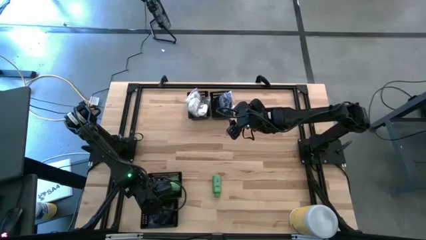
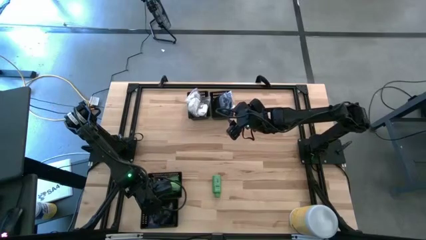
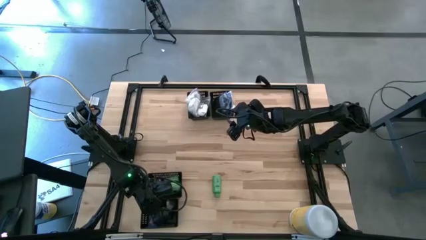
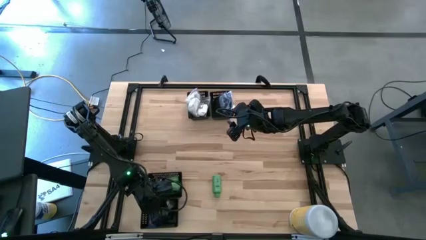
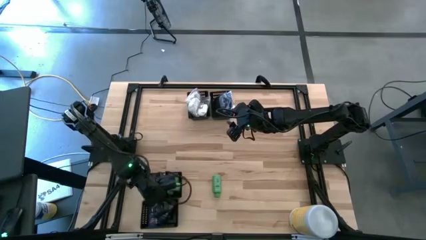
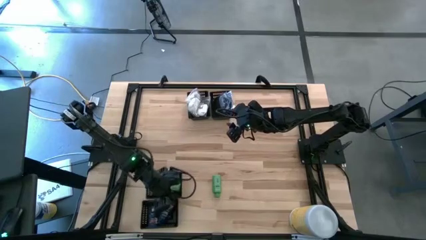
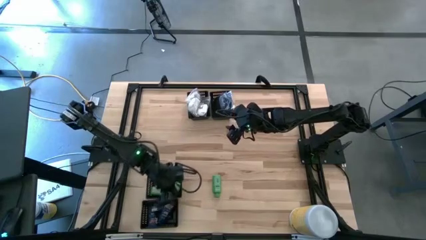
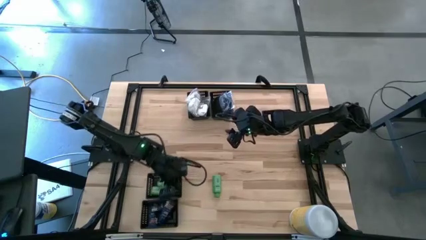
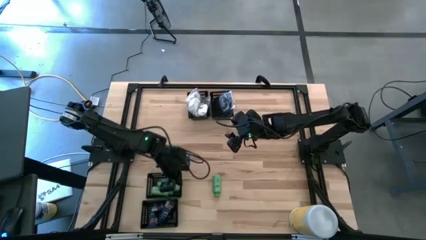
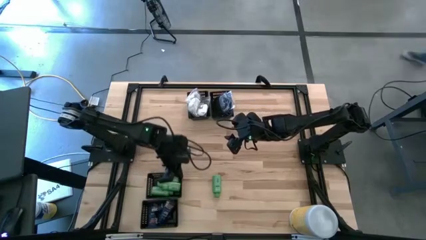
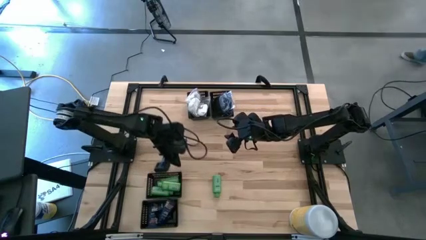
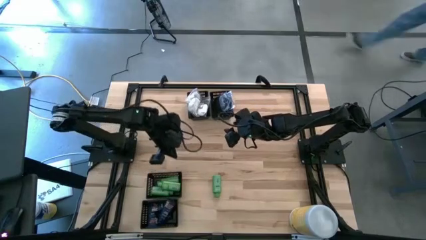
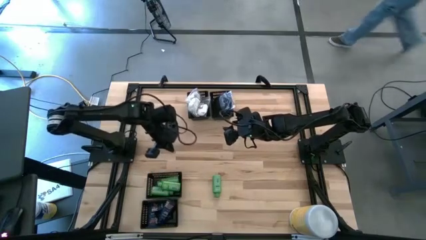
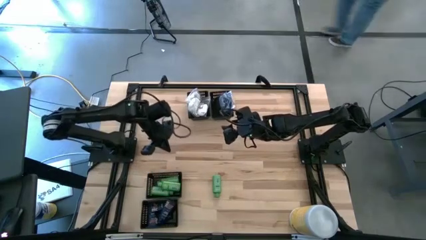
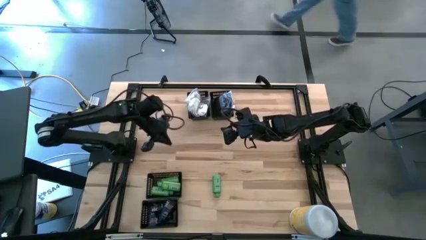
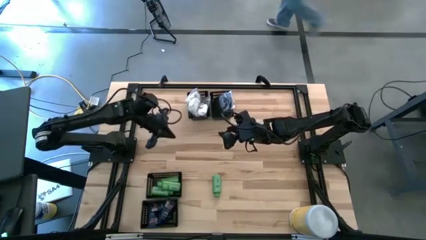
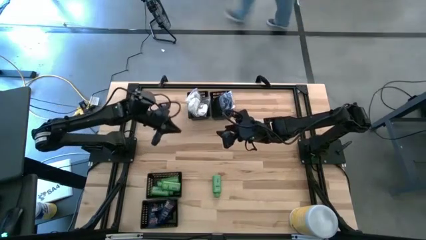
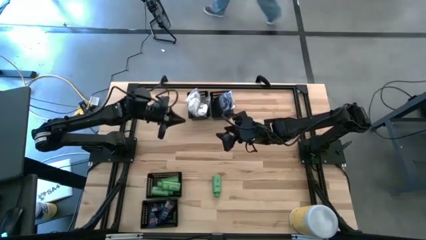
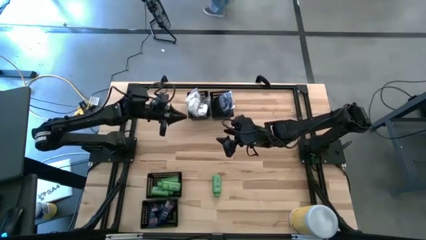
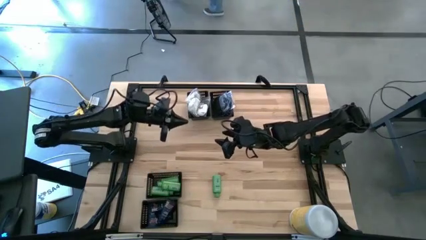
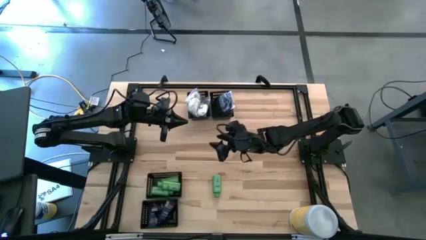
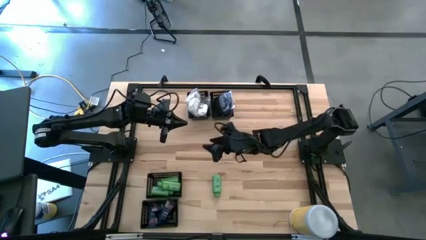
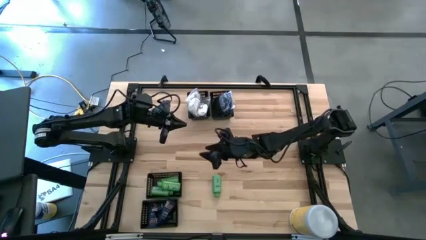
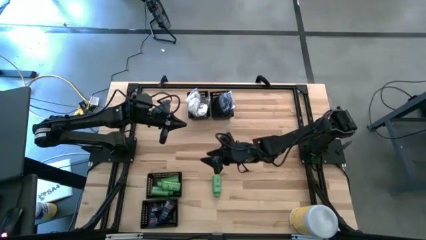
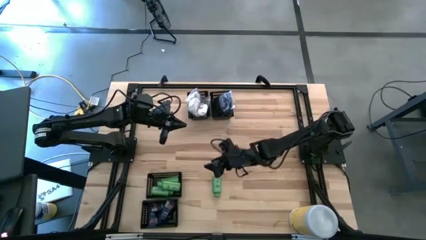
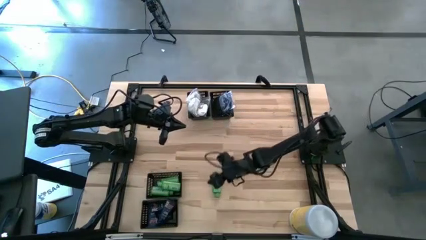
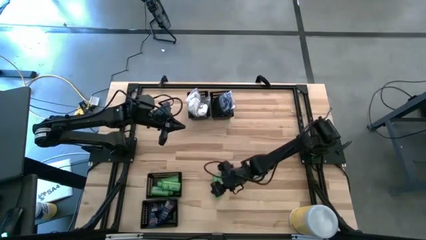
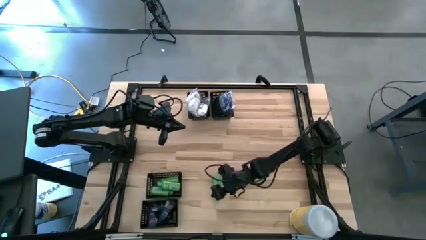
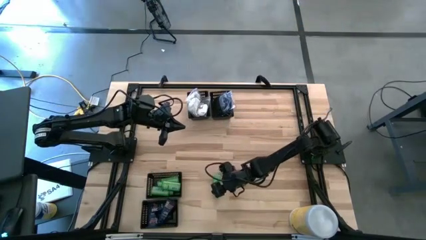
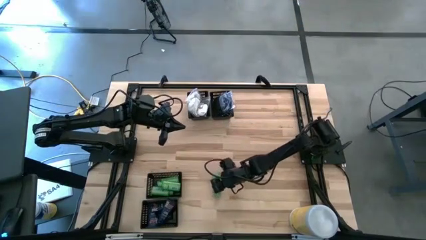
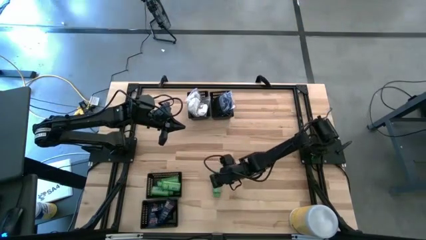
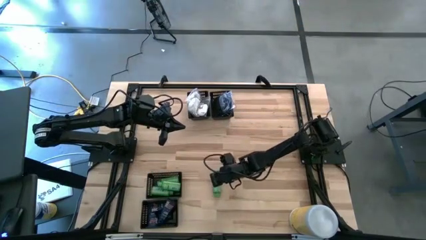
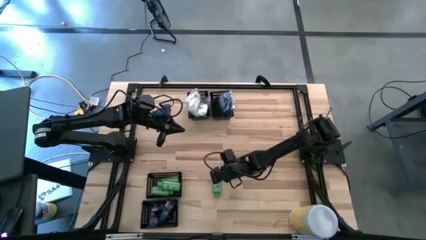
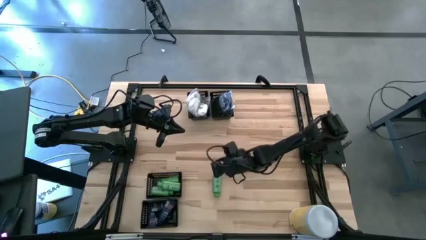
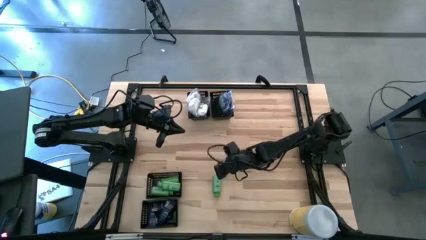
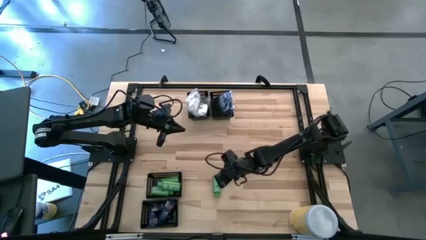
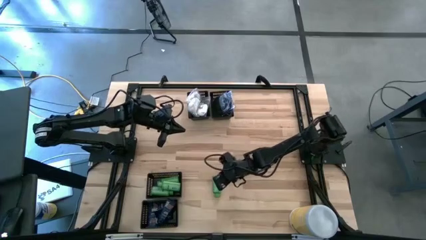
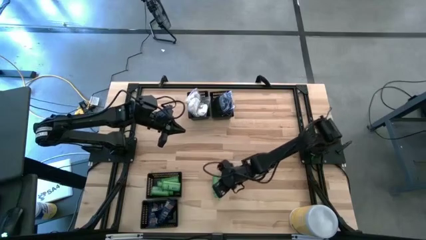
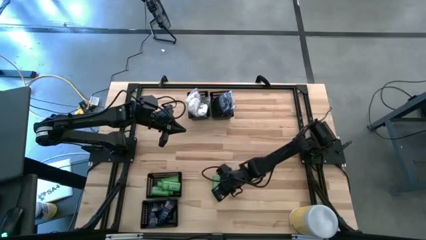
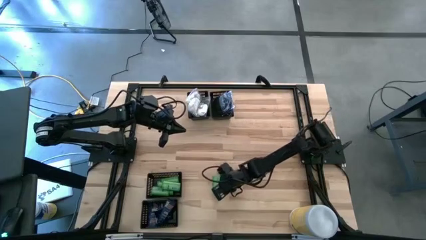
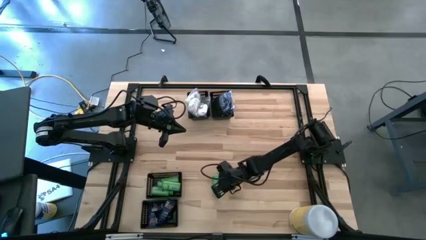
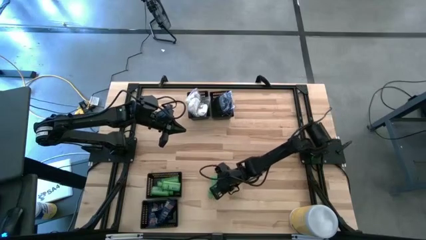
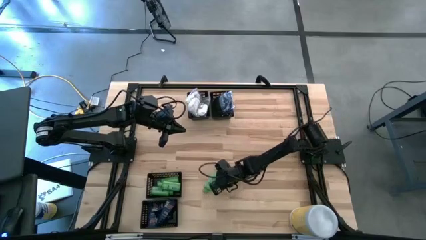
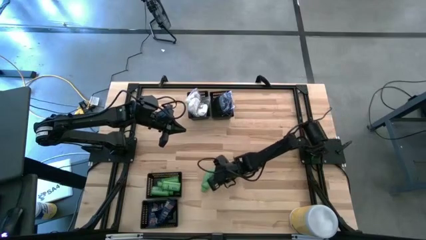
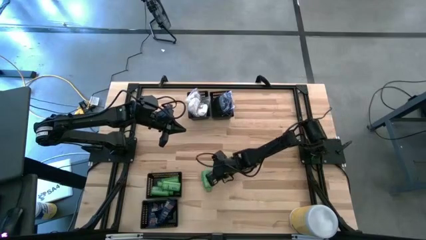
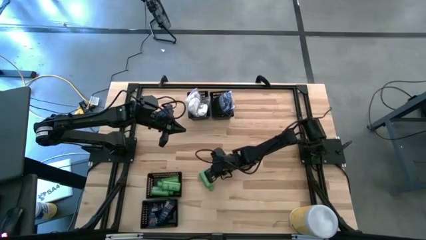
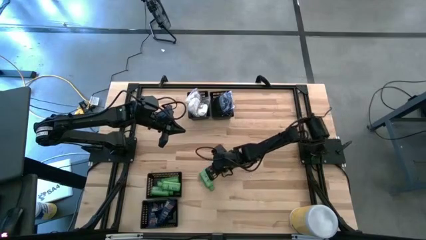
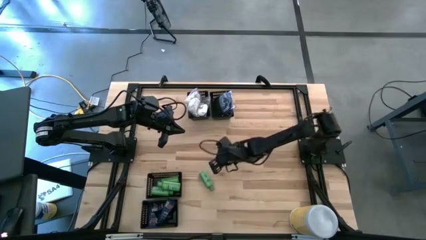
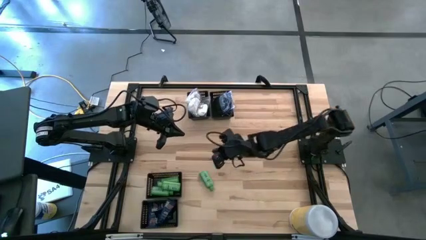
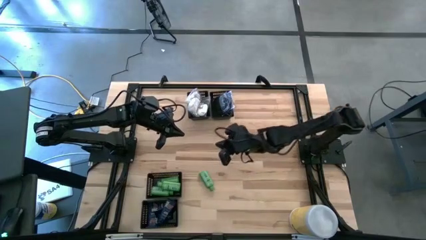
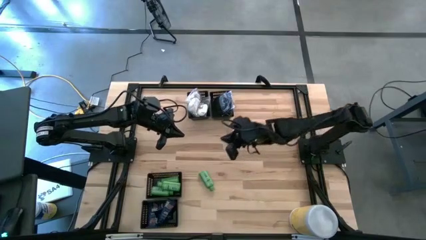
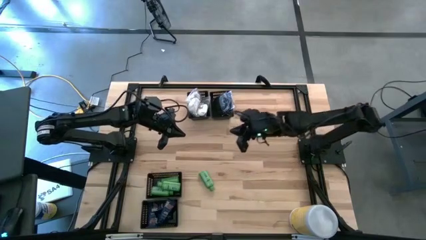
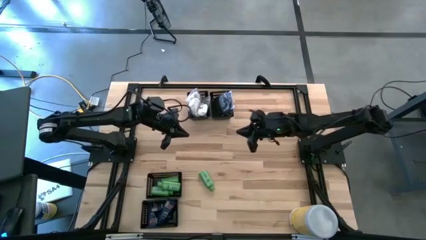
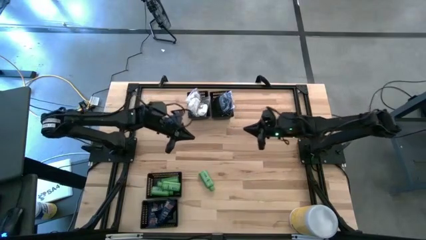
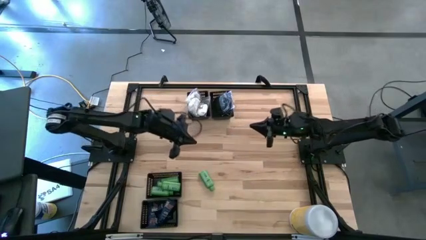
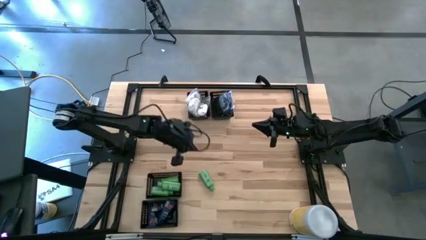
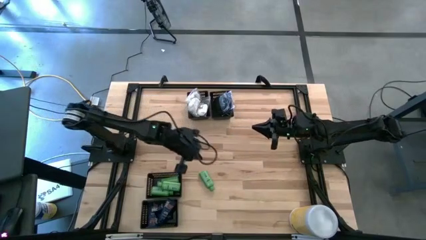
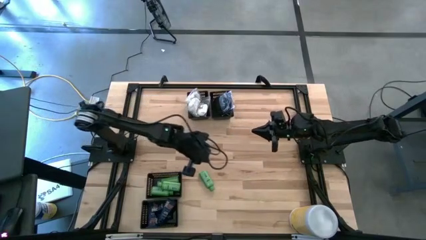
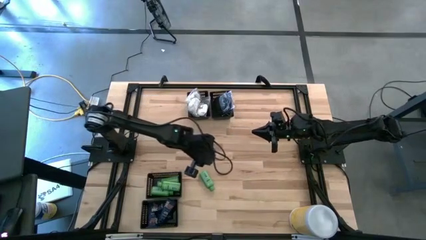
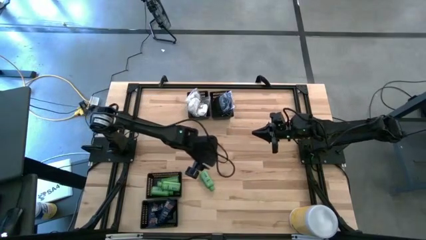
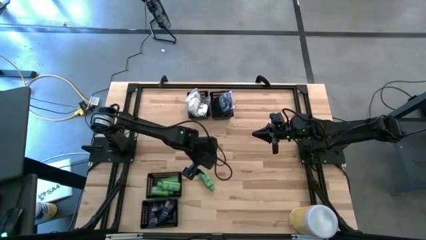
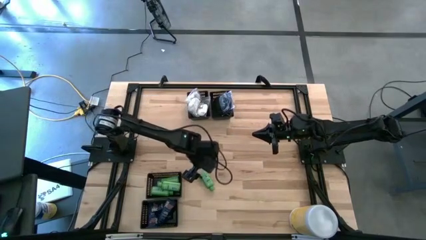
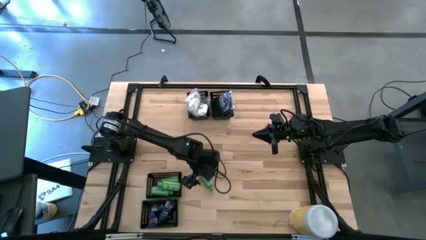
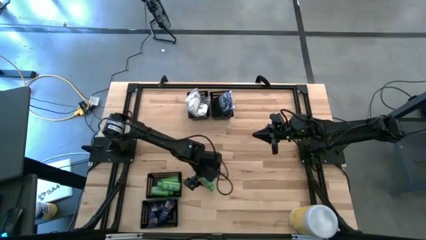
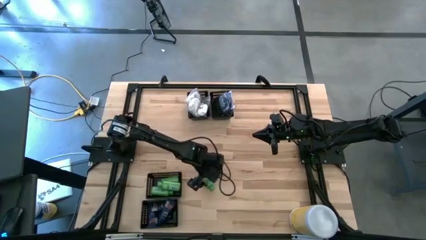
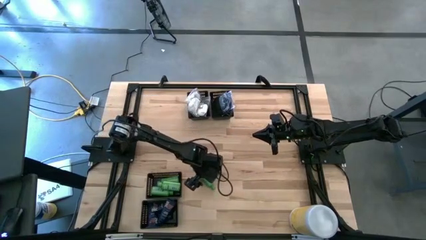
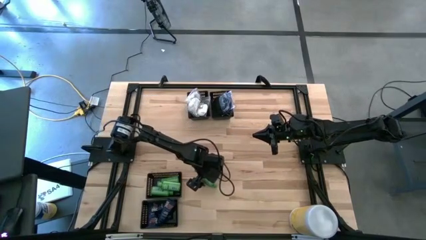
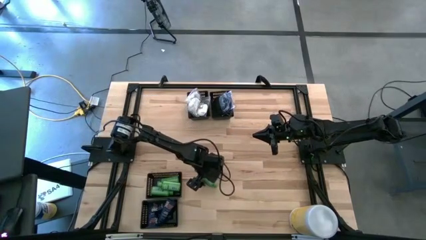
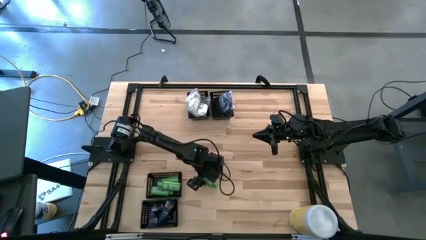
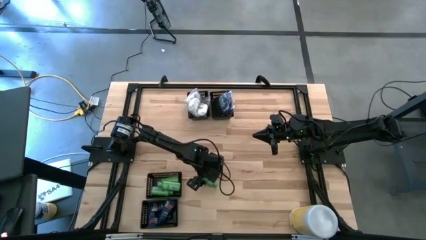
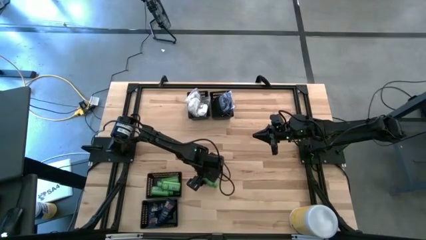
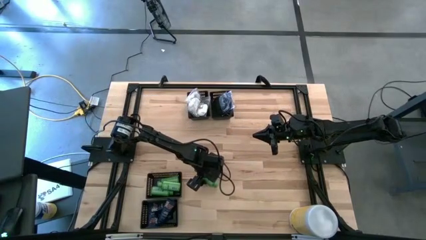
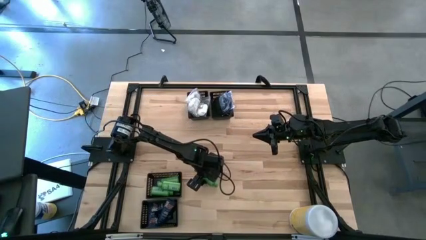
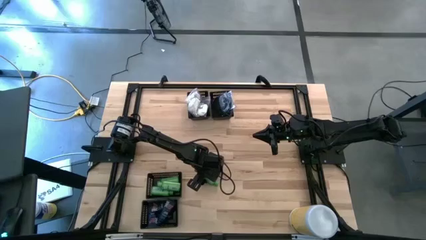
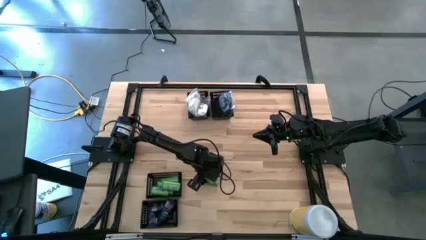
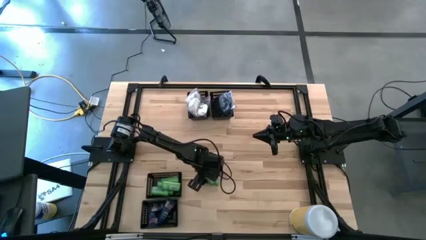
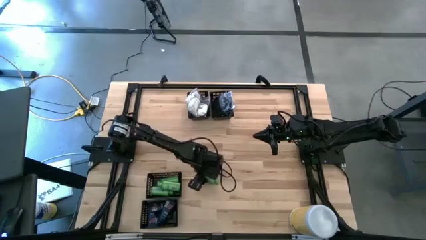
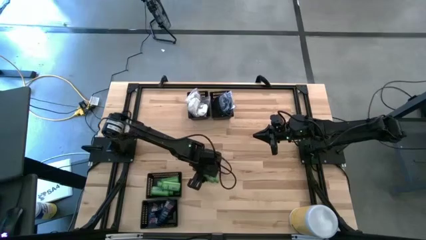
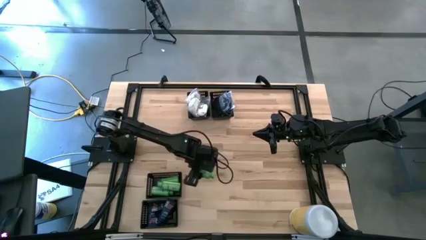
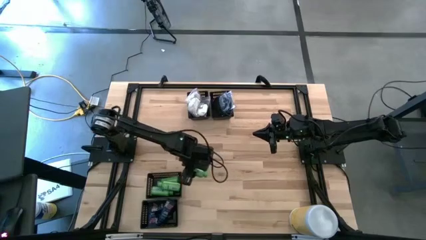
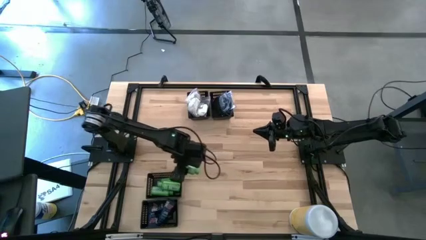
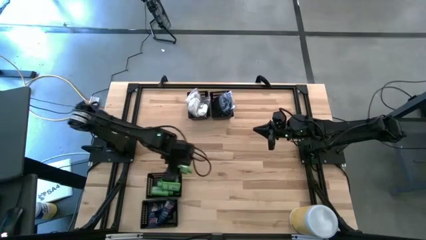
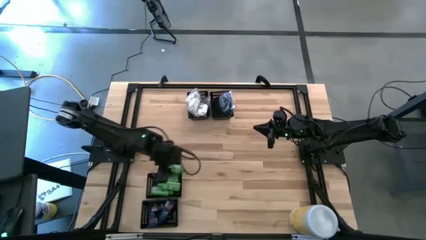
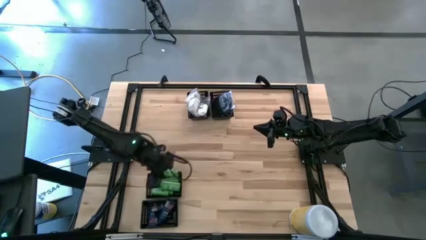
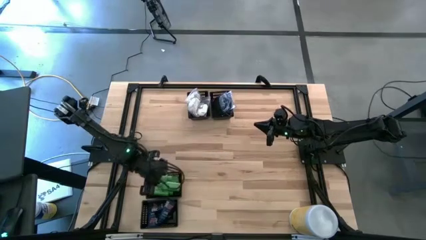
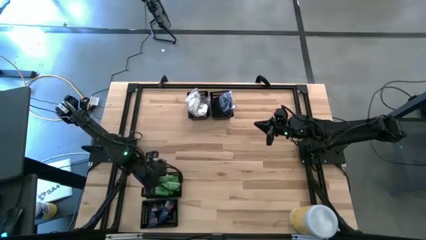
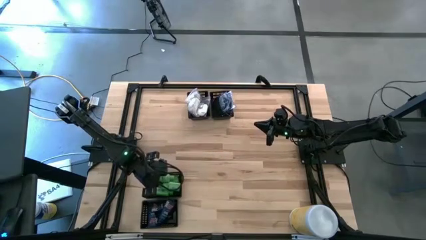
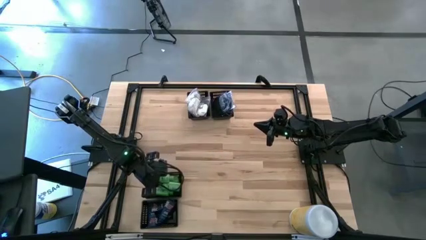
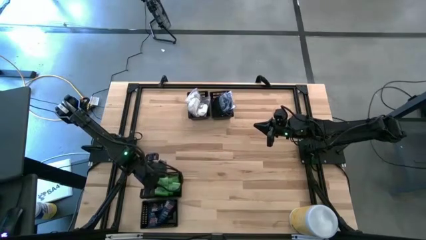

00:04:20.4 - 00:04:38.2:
Task: Pick & Place Travel size toiletries
Put the green shampoo into the middle left basket
